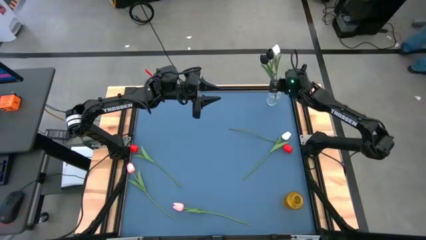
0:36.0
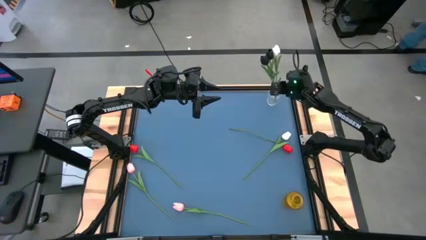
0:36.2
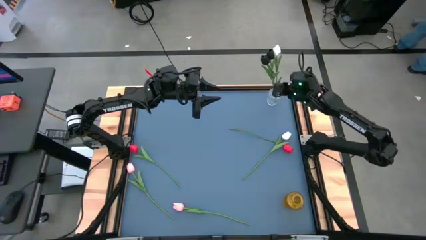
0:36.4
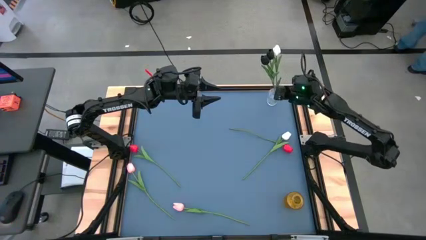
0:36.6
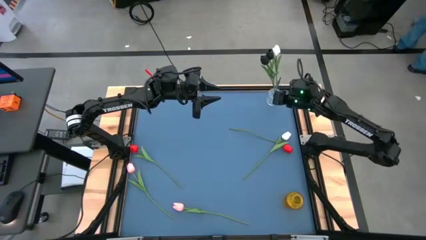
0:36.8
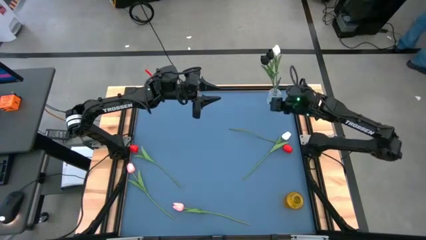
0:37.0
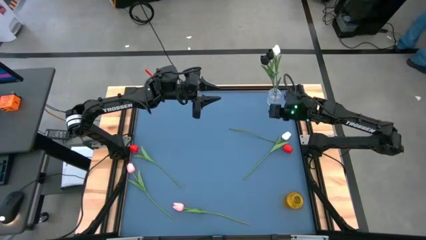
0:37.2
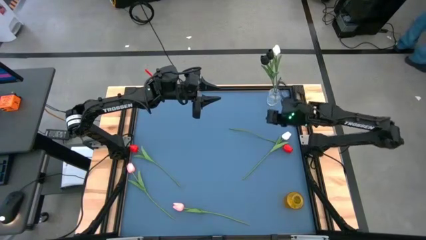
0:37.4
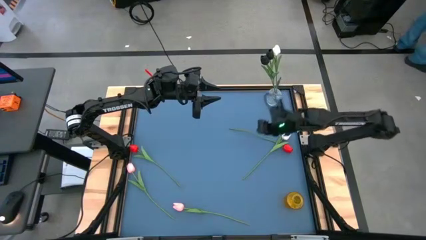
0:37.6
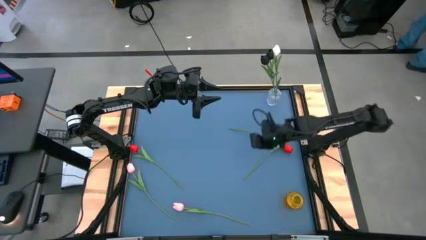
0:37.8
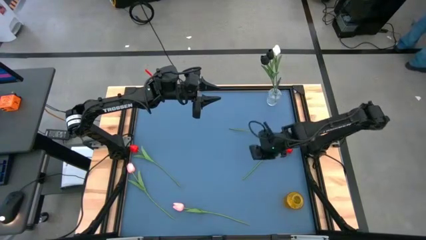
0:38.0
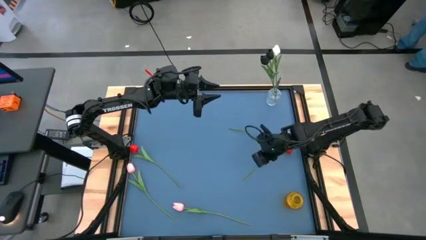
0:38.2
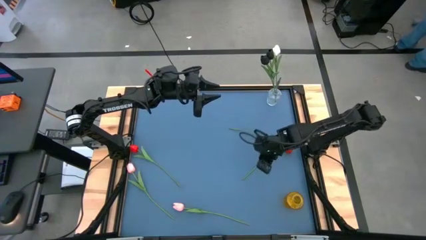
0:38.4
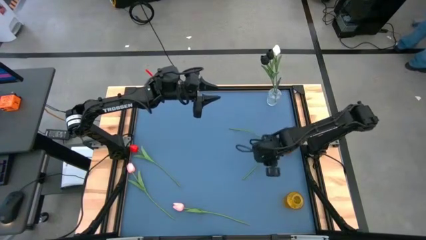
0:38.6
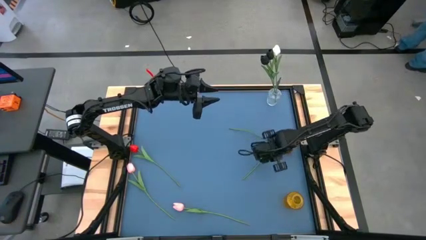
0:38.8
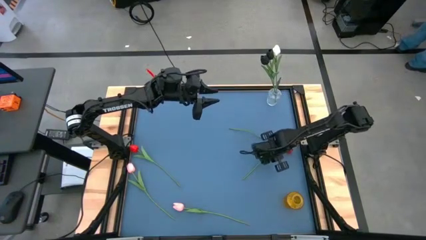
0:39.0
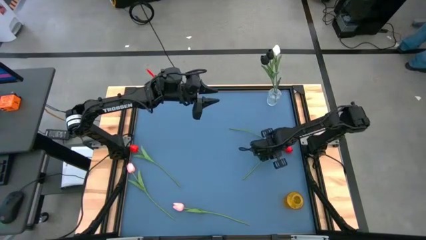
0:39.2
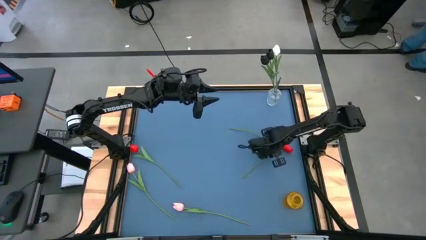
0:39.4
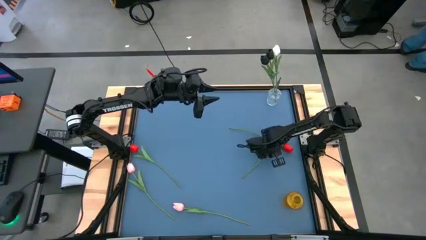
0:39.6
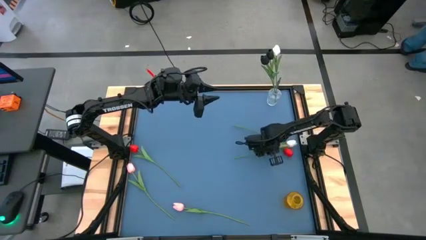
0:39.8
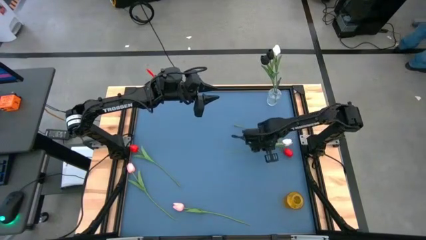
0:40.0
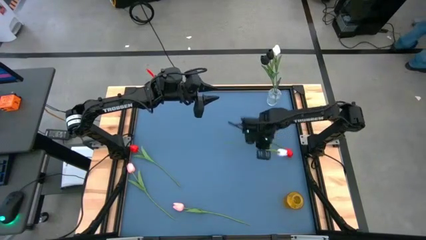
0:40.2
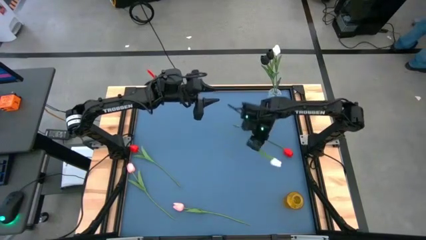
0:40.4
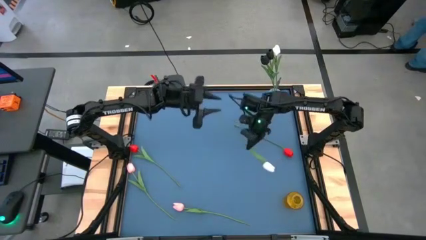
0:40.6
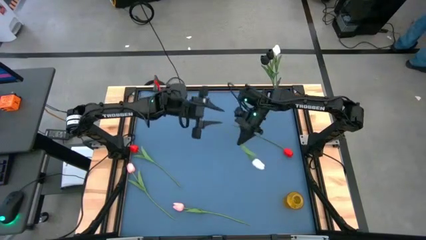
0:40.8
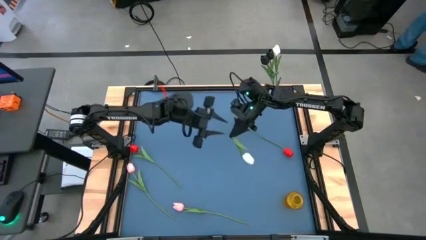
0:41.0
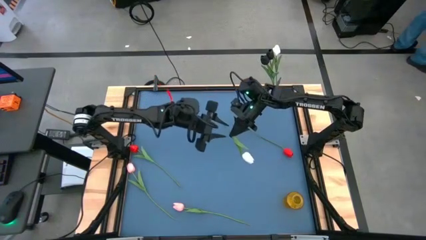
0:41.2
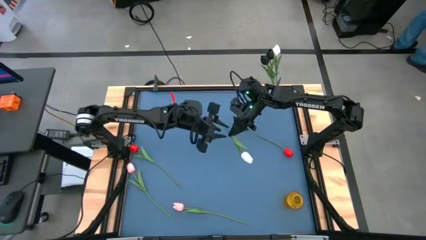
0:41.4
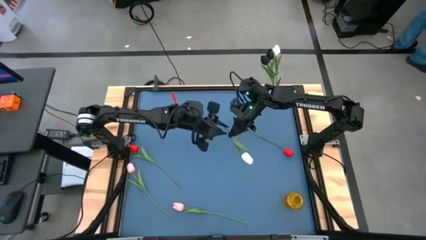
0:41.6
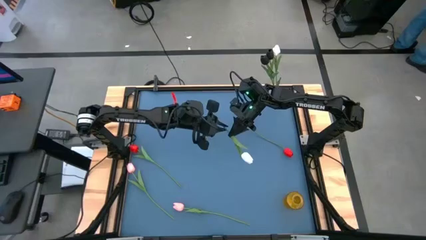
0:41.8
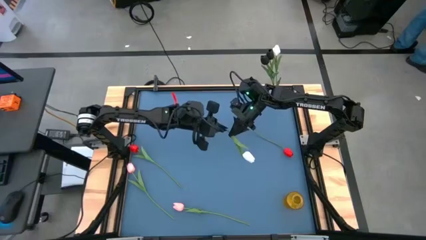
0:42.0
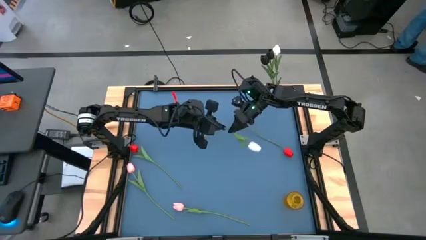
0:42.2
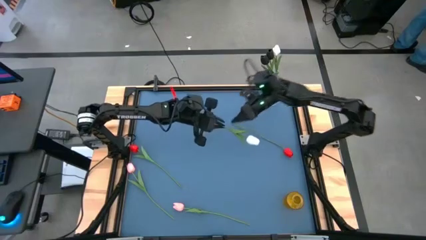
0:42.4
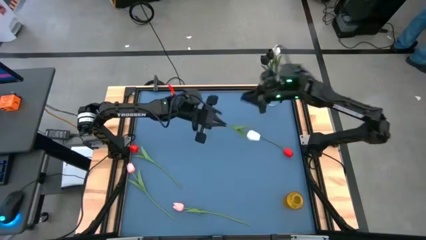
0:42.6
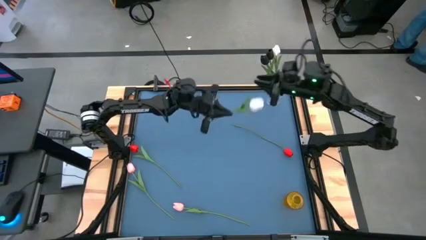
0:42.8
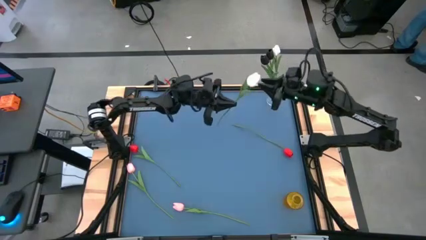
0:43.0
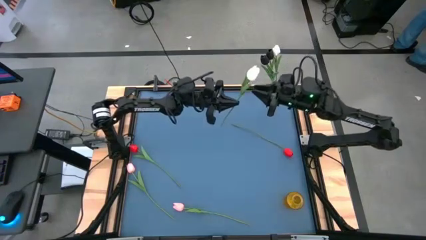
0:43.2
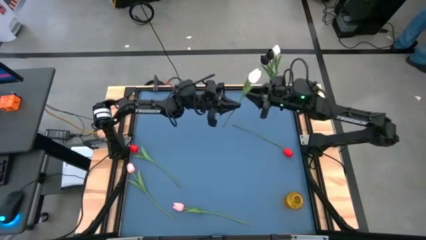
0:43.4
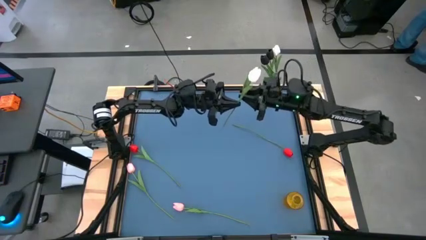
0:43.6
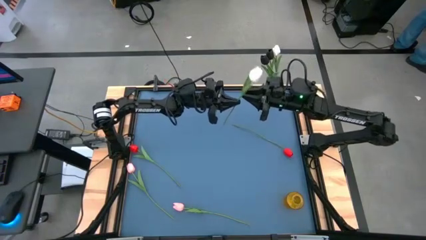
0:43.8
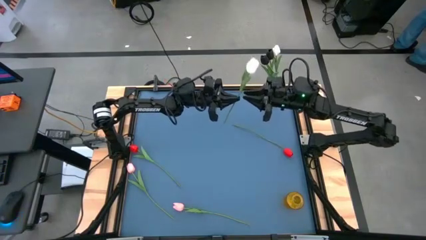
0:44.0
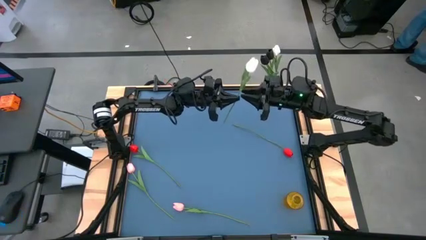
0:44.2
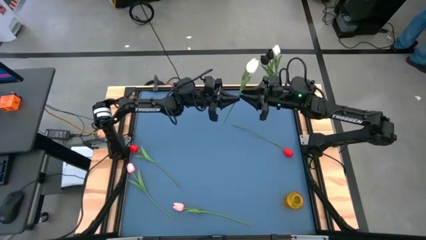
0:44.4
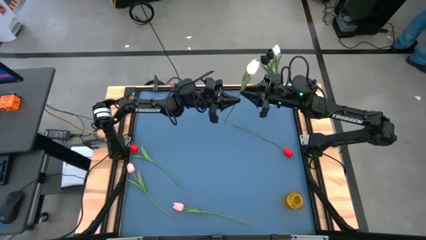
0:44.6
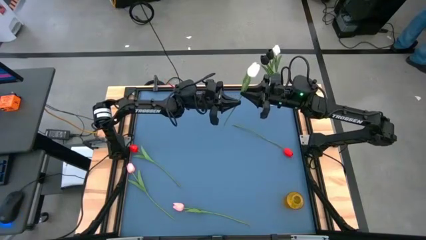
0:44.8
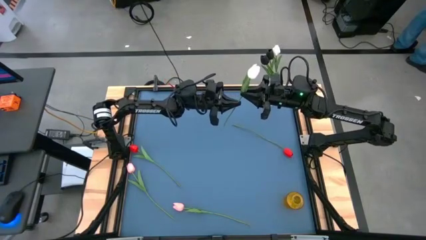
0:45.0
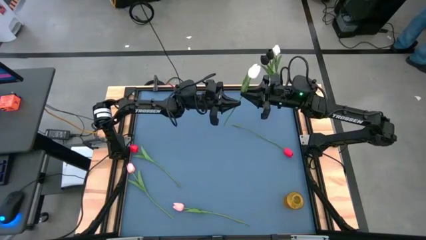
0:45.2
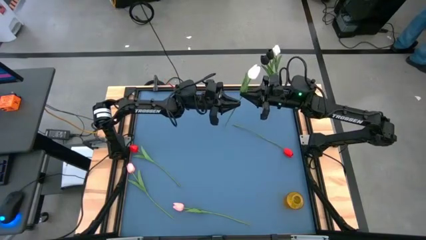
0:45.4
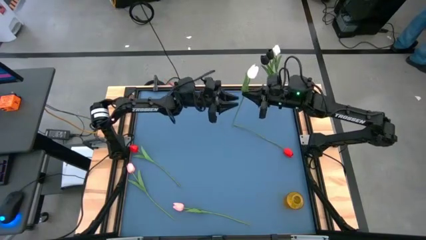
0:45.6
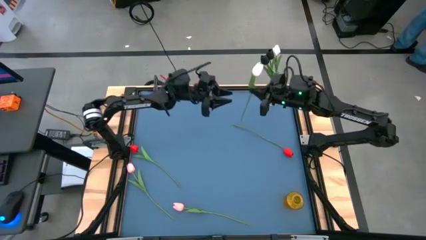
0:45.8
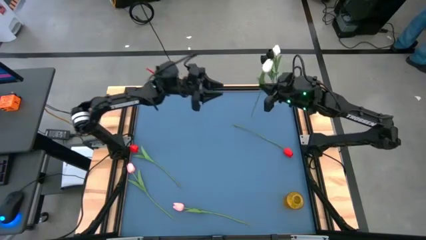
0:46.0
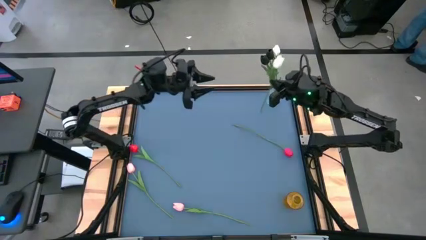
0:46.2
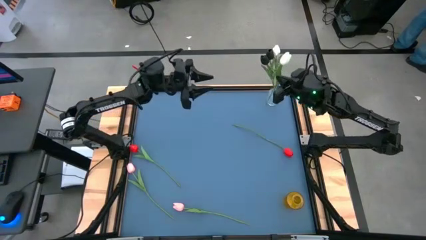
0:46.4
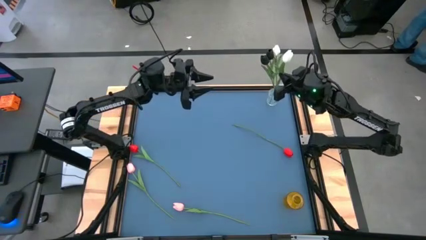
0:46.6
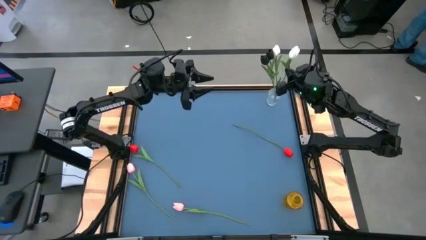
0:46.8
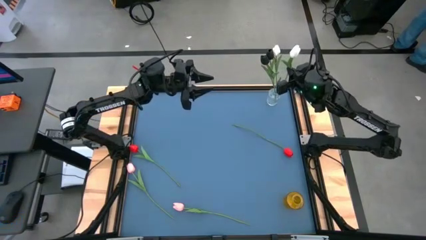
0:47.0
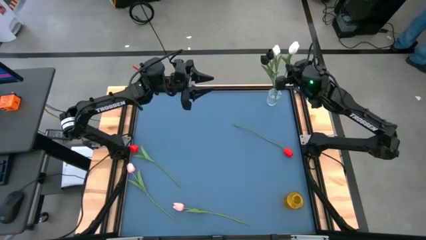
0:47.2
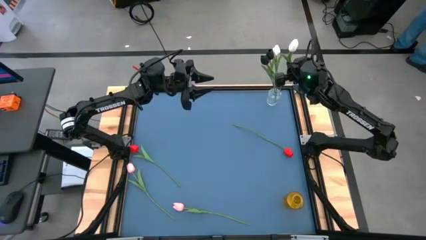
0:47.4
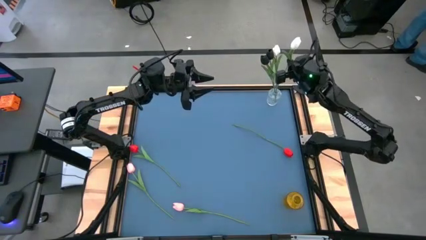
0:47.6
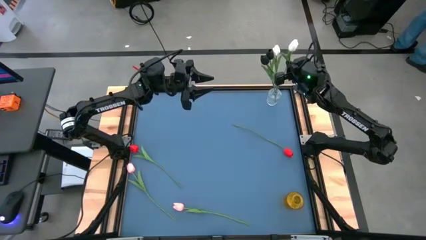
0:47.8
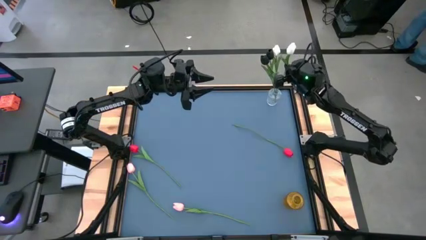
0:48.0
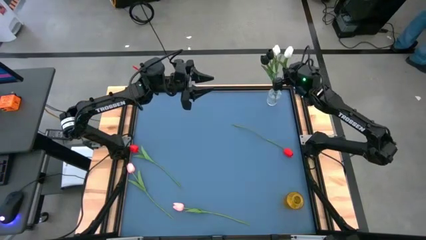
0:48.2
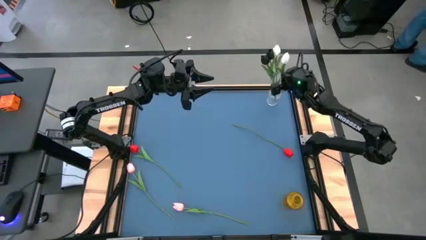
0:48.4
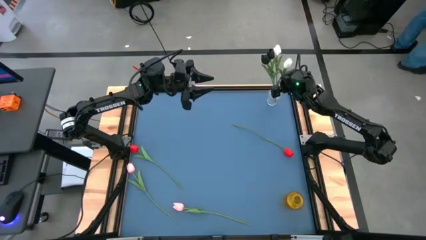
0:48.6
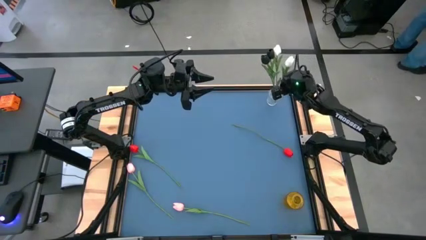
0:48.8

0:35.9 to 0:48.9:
Task: Sort flowers into vase by color
Put the white tulip into the transparent vase

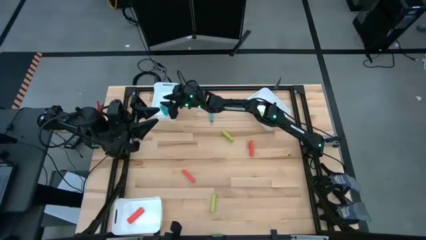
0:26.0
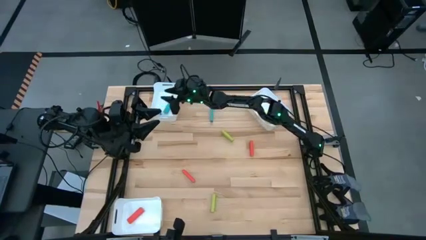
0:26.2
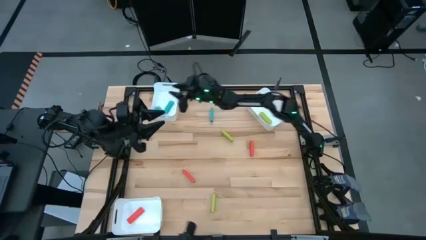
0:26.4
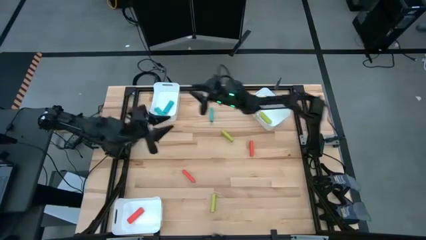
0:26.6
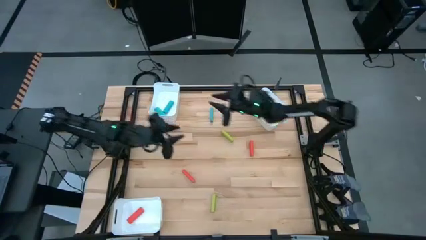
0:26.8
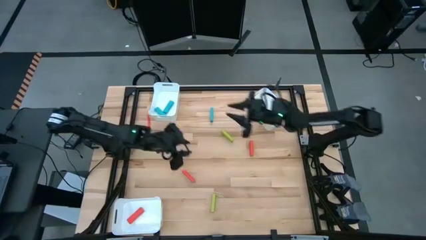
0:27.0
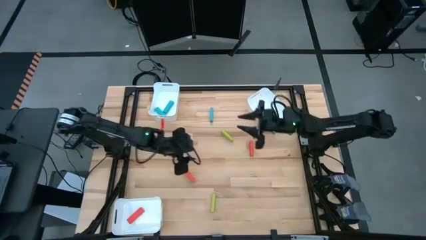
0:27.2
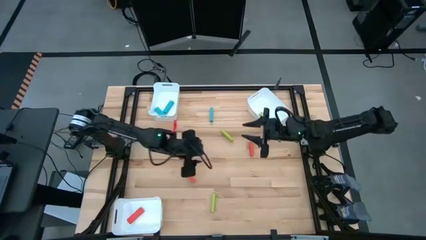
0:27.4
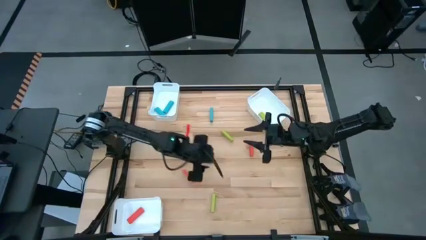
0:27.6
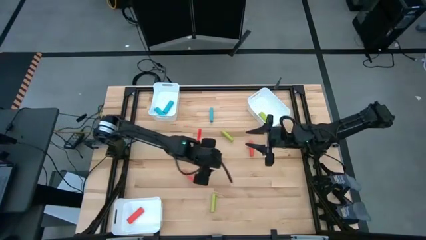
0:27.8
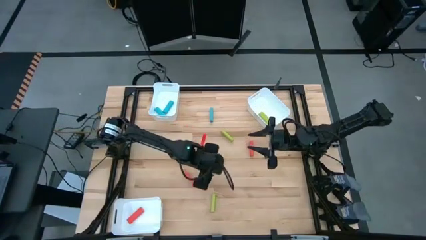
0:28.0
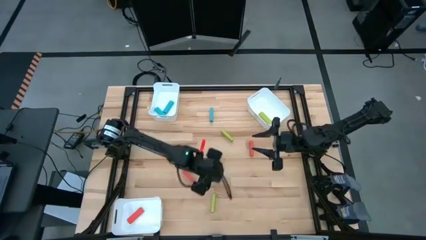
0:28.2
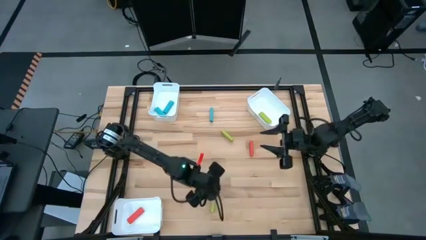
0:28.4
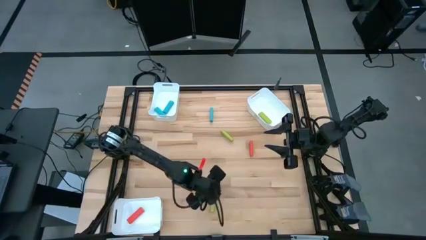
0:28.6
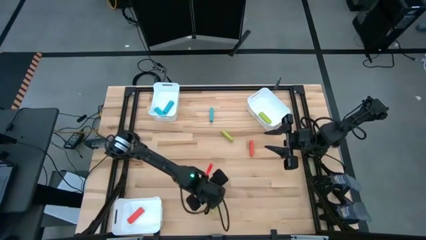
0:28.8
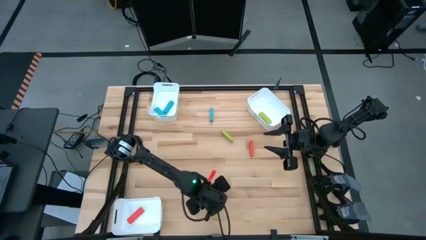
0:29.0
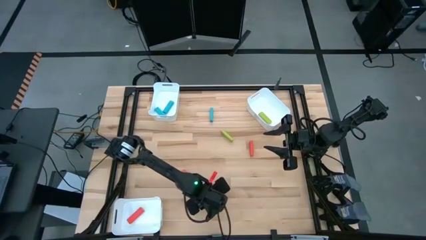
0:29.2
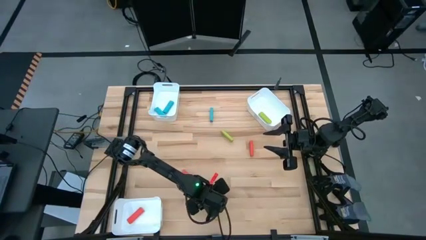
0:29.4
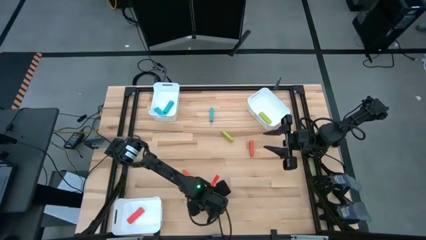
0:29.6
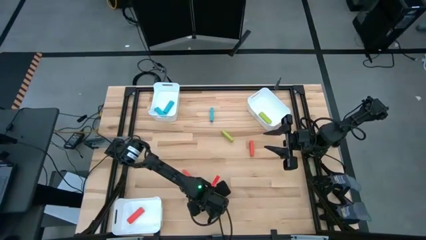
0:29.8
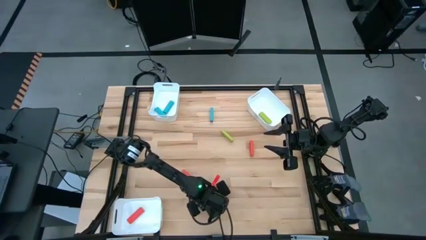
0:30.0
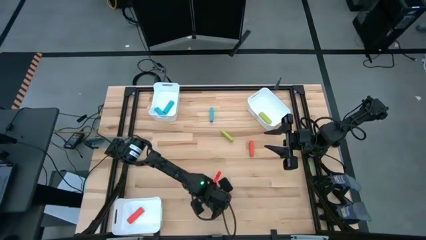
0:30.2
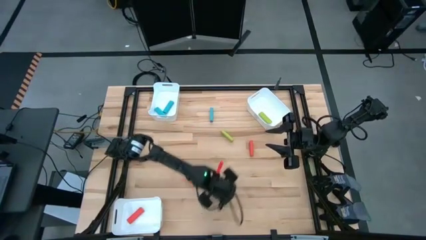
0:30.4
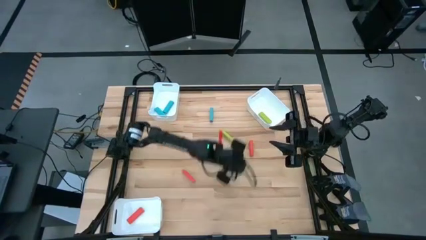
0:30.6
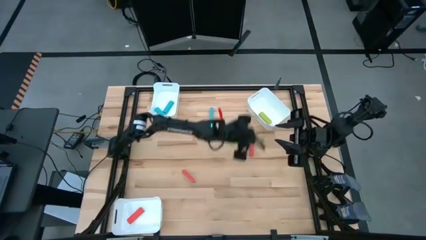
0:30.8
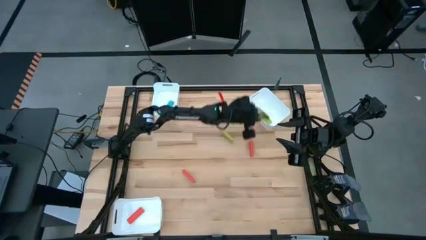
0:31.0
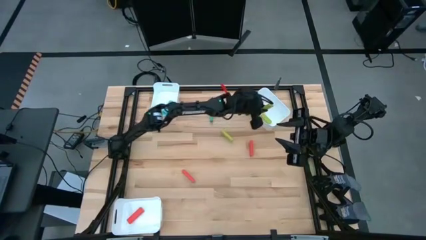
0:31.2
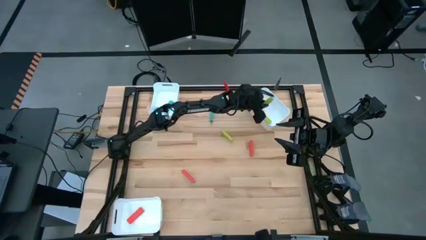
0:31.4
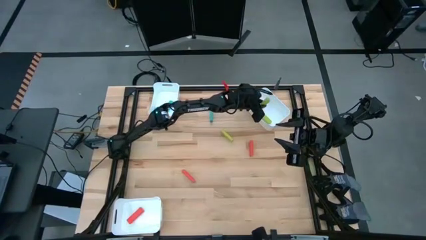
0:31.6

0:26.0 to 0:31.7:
Task: Sort blocks
Put the bottom green block into the top right white bin
